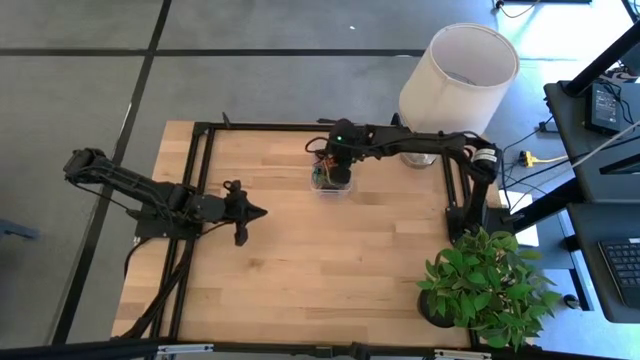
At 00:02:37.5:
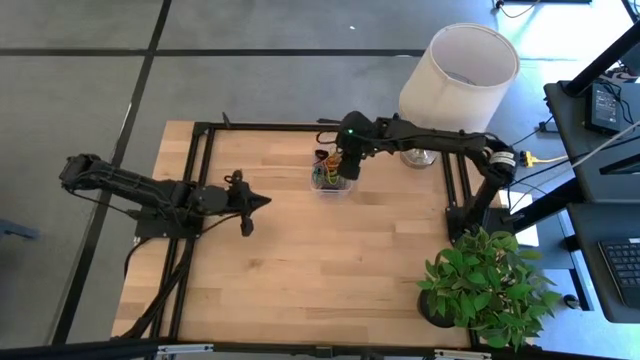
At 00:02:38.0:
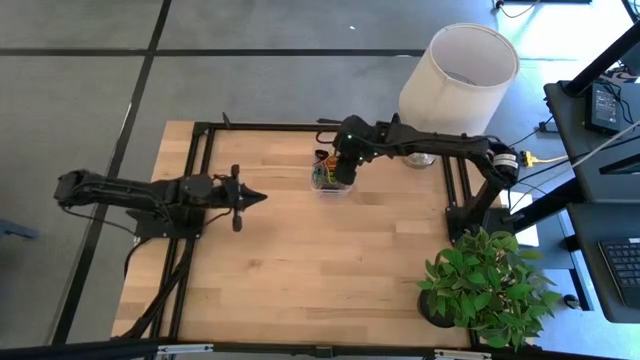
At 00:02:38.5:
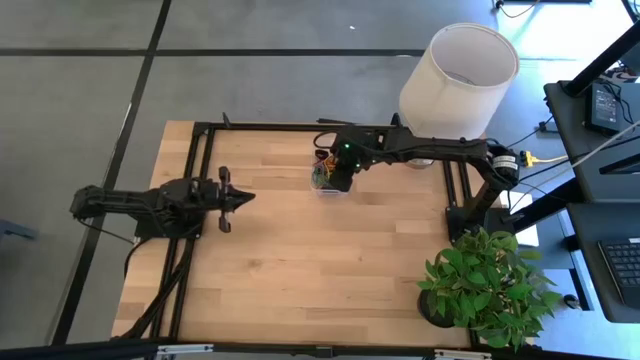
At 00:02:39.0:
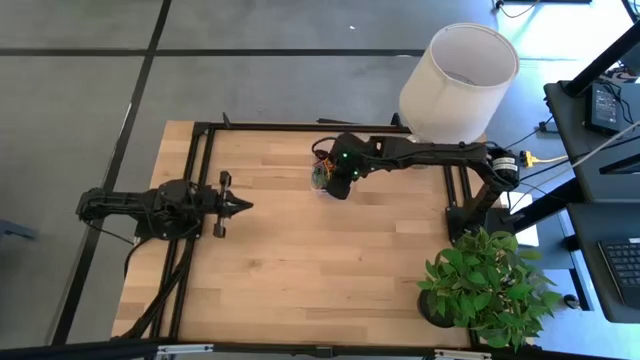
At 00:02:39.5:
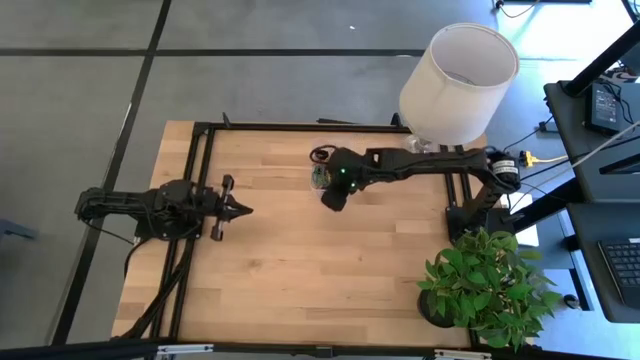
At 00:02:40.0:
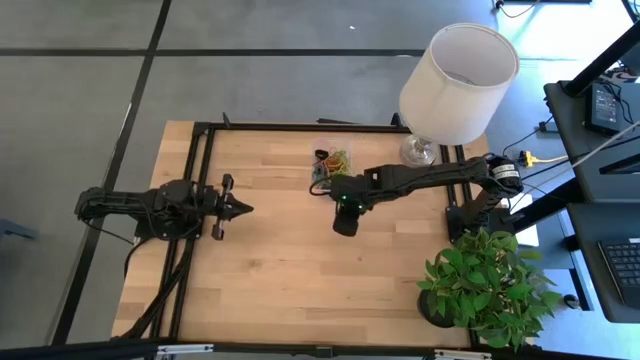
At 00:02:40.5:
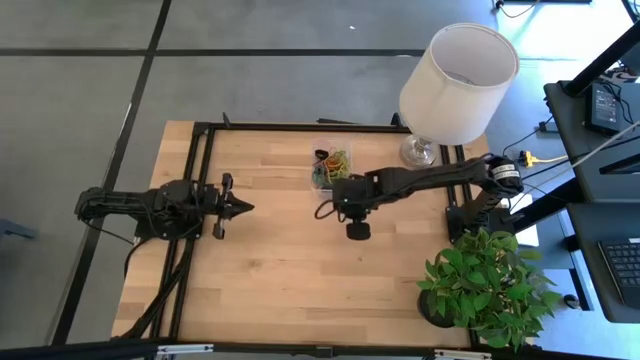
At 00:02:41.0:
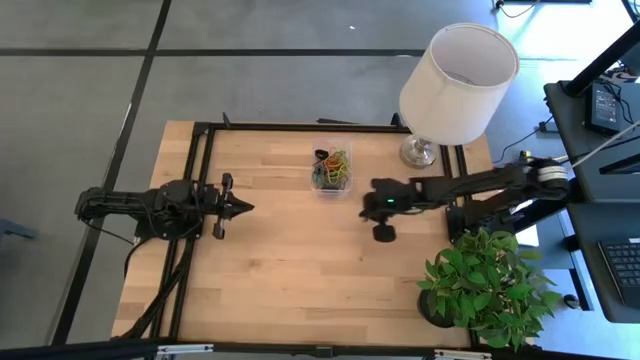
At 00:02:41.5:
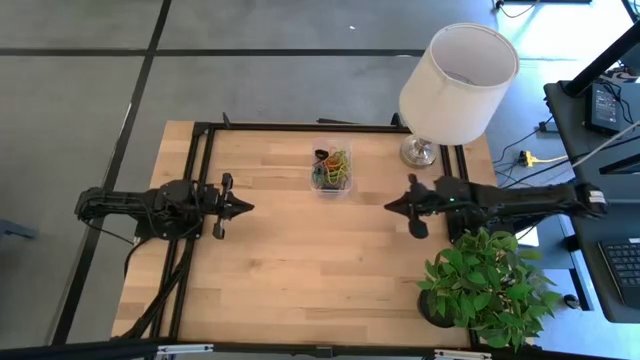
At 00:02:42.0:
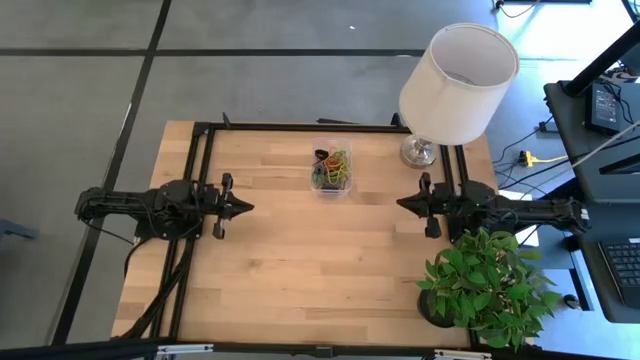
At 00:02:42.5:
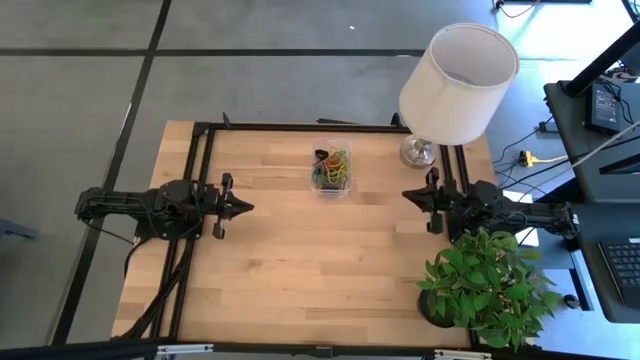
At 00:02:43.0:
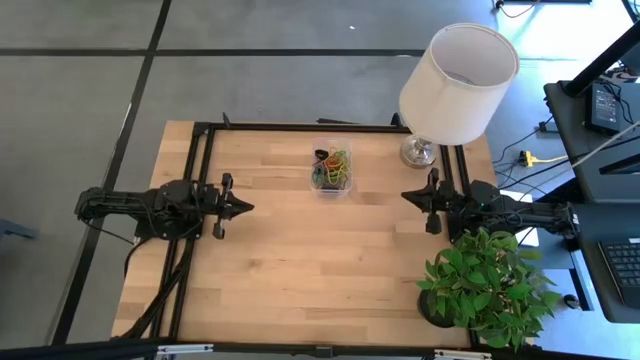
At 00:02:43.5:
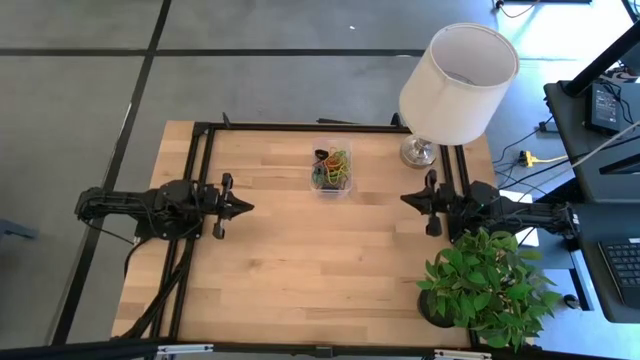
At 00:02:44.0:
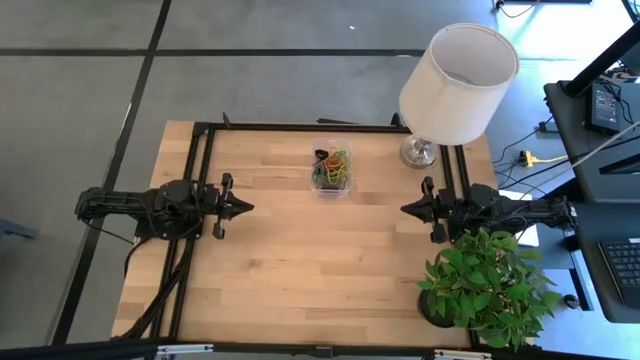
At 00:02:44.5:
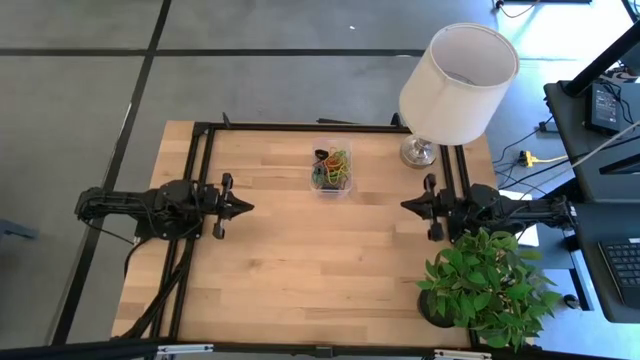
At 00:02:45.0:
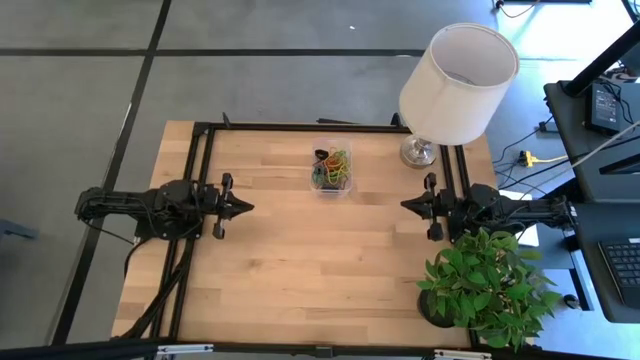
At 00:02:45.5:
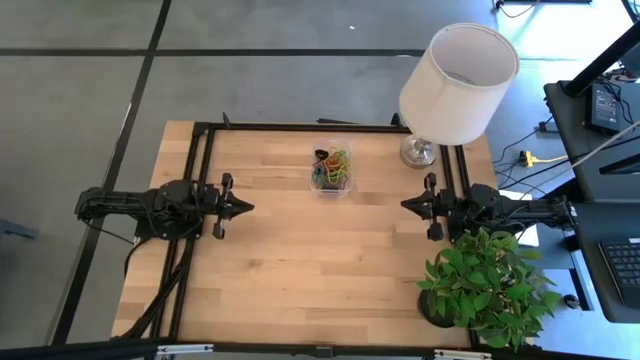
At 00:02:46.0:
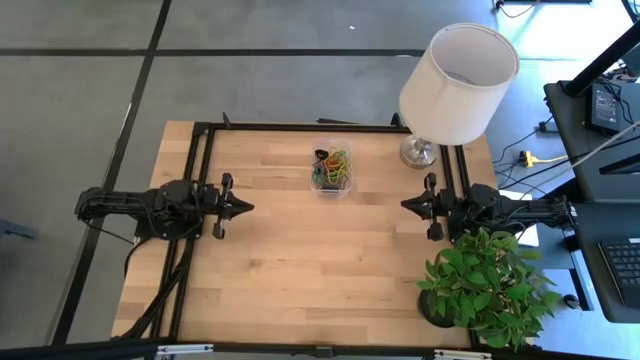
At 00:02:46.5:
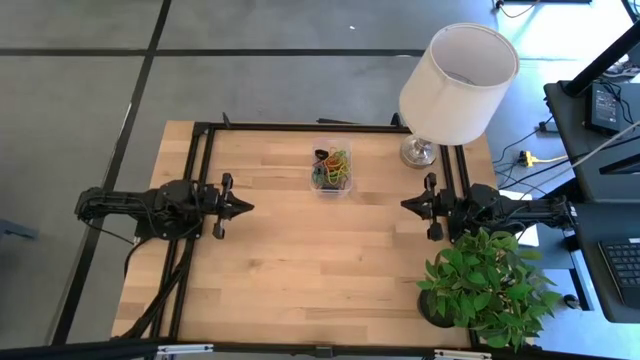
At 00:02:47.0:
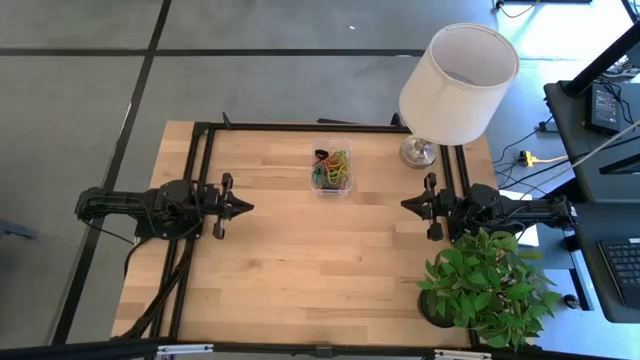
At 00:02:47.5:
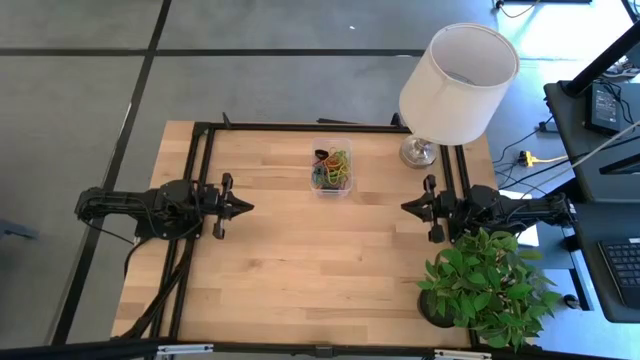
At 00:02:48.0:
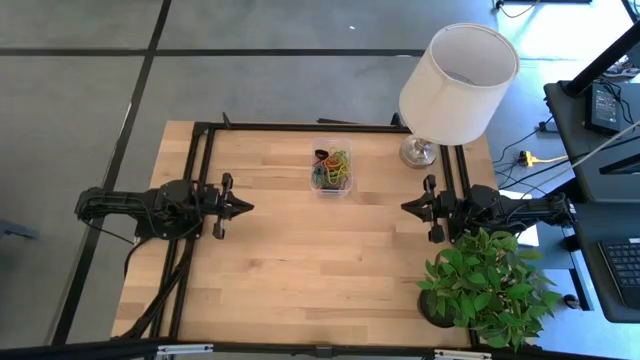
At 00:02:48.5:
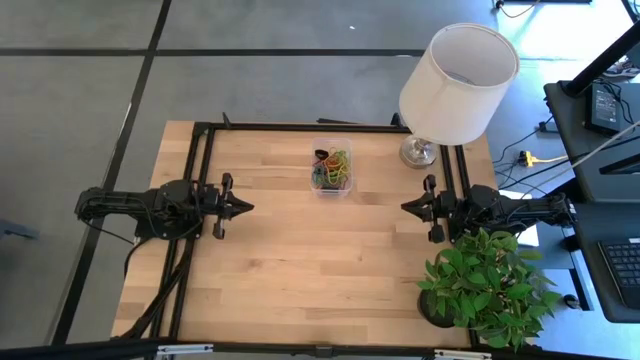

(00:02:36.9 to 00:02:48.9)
Task: Pick and place rubber bands into bin
Return to Home Position

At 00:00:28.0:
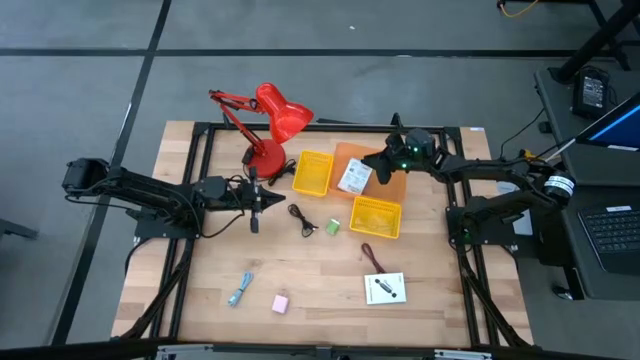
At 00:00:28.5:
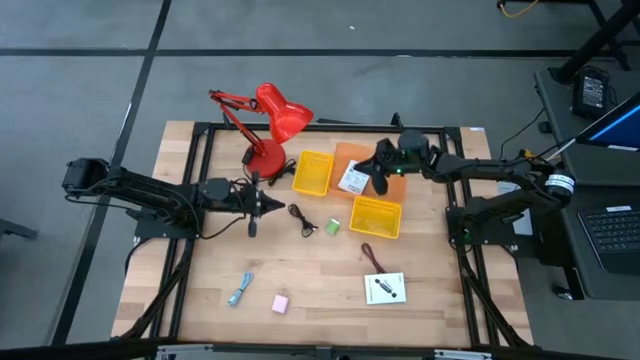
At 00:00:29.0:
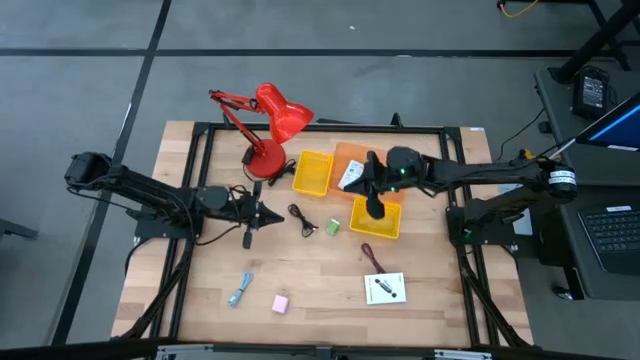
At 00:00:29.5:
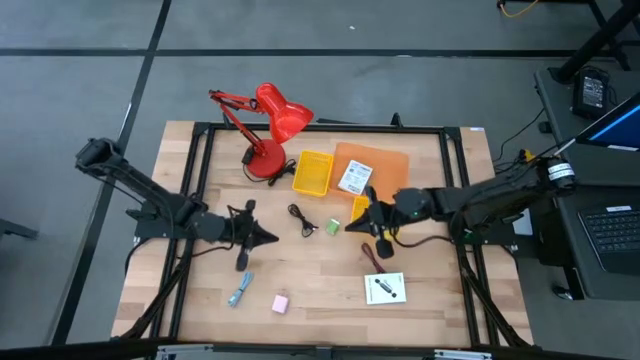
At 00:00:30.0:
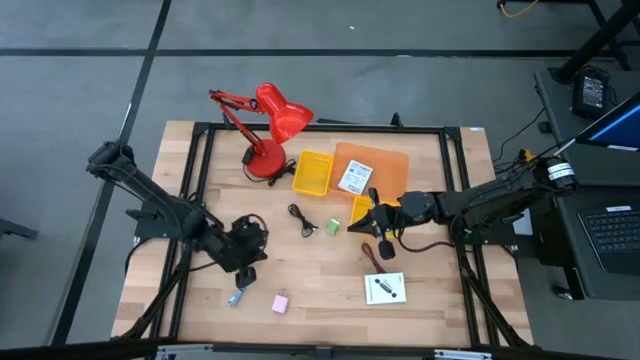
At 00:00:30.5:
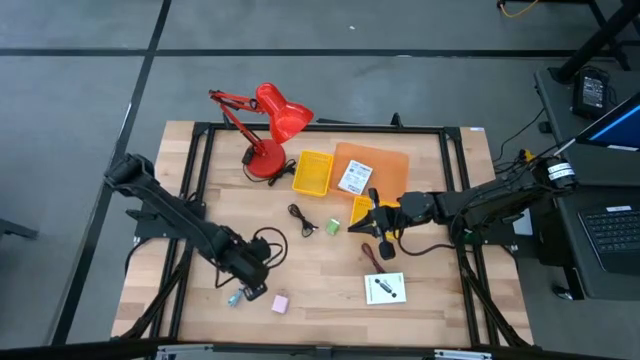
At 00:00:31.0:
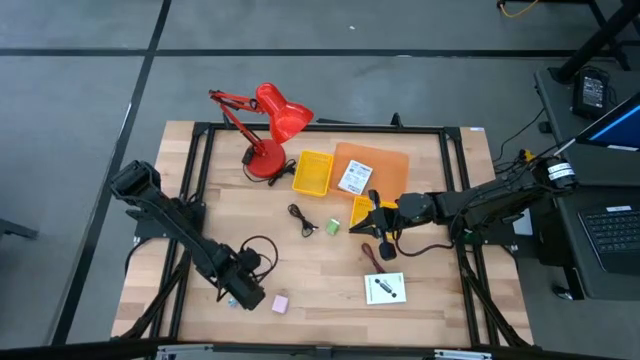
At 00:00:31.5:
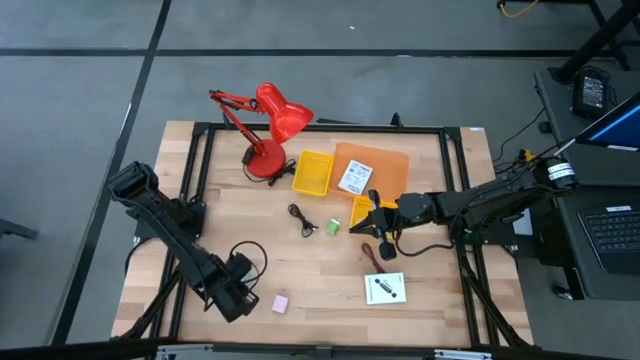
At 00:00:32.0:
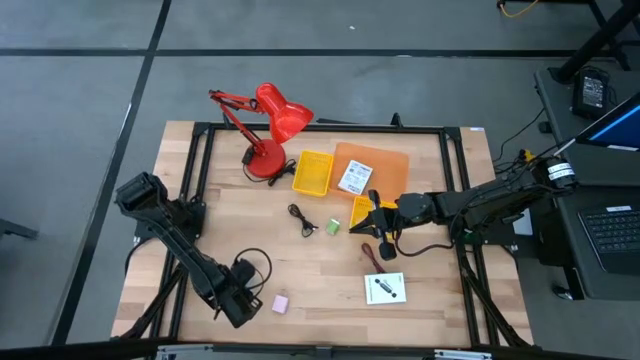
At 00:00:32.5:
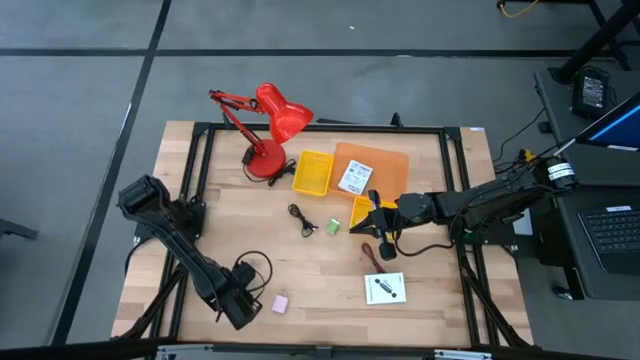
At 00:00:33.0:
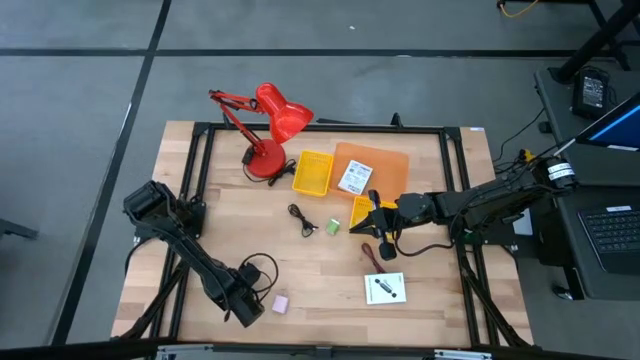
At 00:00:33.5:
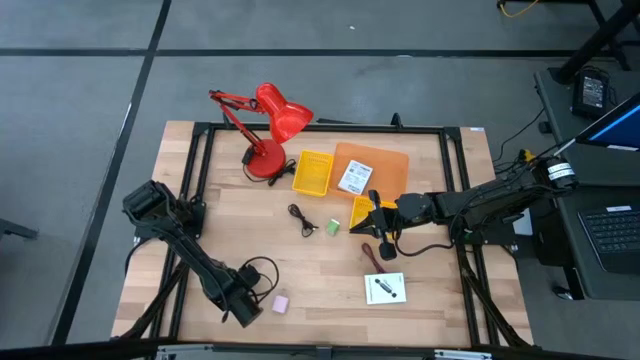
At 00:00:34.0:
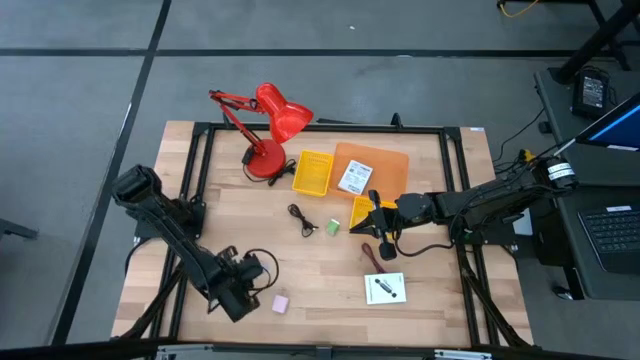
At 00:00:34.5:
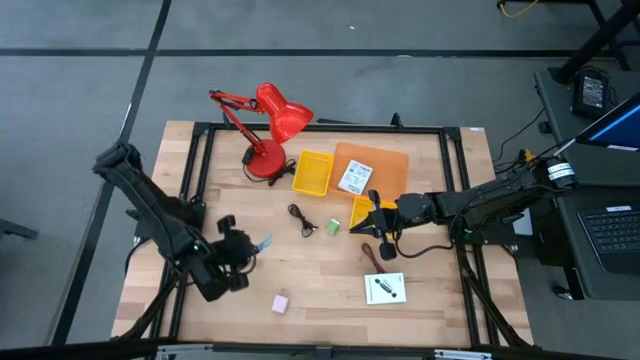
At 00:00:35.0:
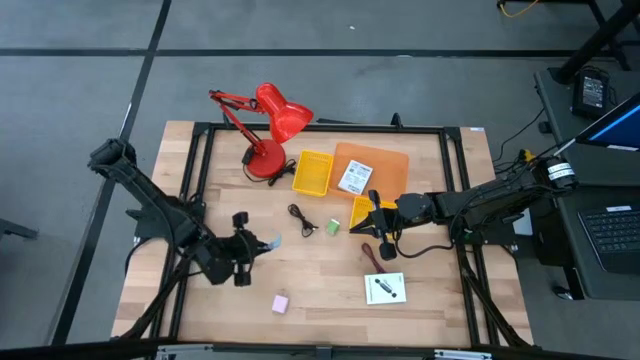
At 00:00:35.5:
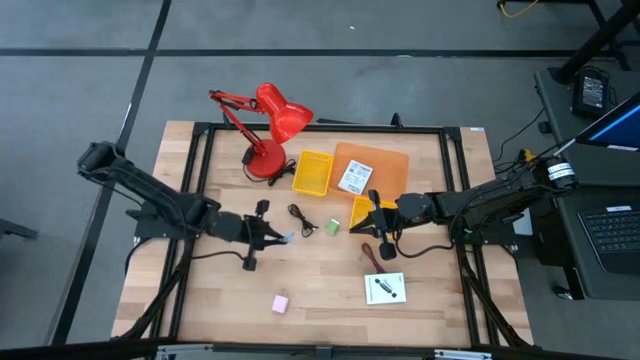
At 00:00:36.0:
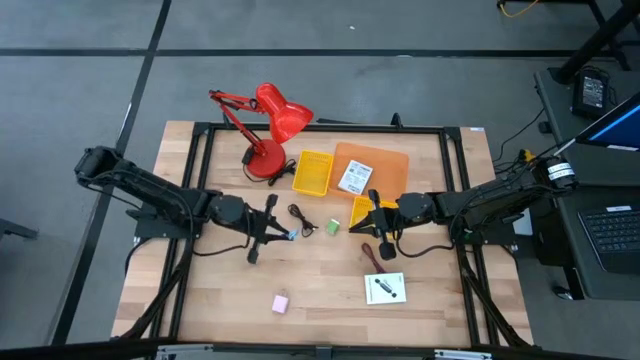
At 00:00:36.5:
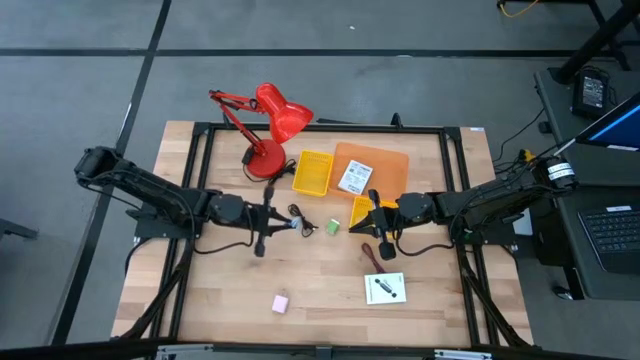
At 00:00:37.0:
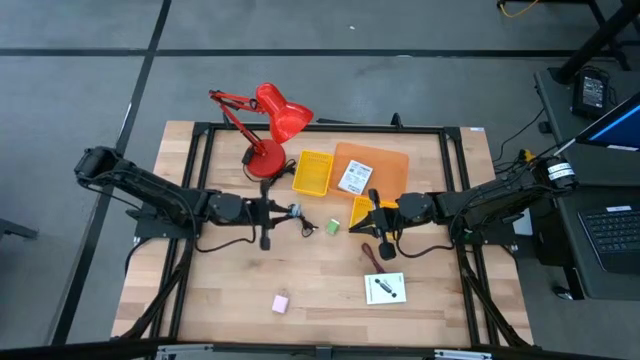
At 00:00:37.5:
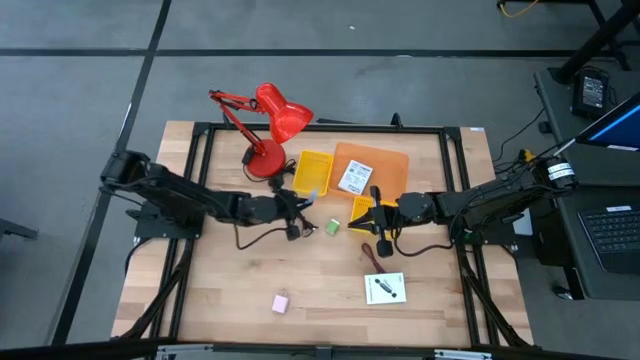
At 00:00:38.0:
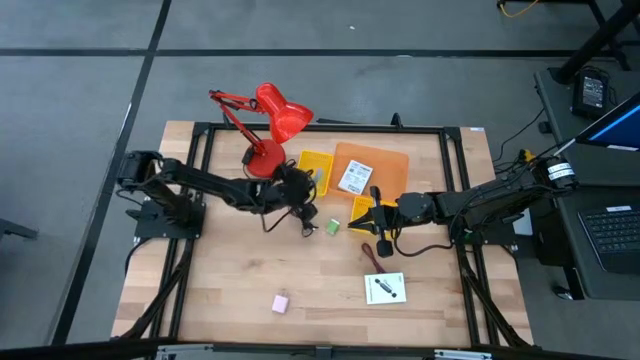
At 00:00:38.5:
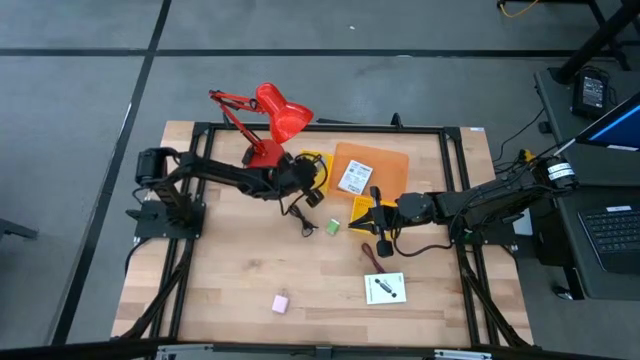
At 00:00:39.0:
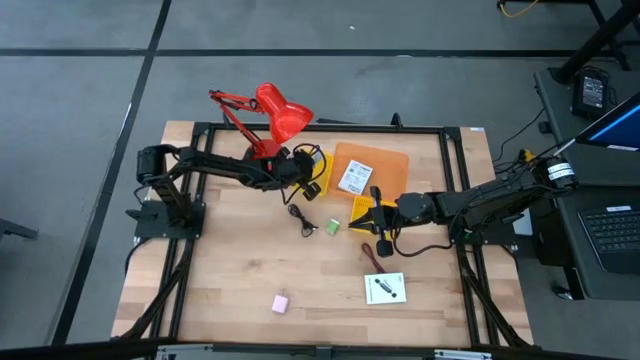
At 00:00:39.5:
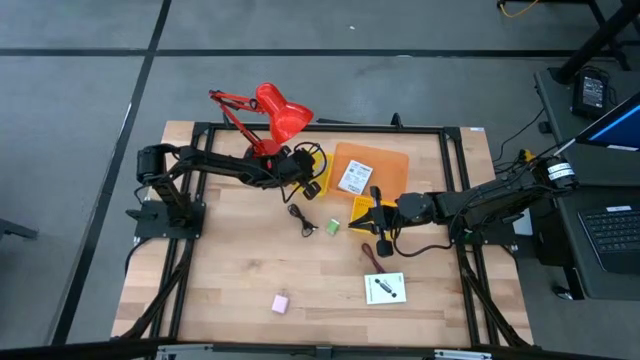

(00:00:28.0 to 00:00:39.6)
Task: Pick and place items into bin
Put the blue cable into the left yellow basket
